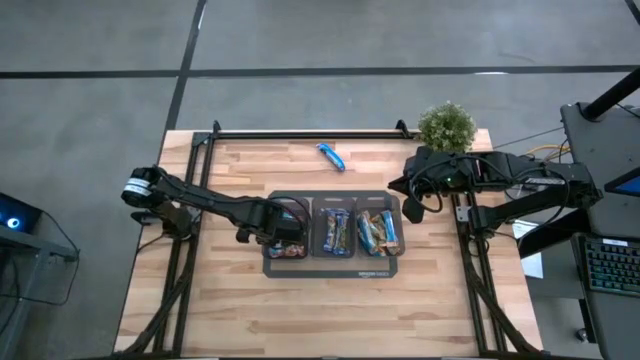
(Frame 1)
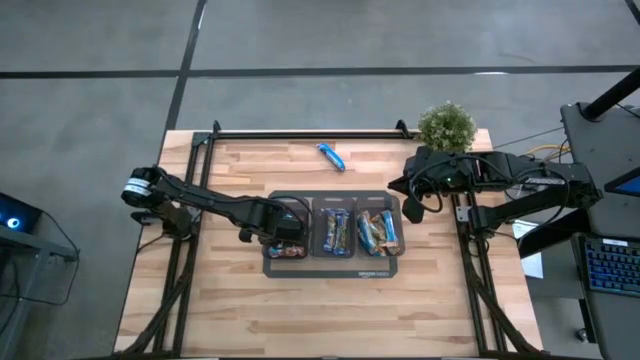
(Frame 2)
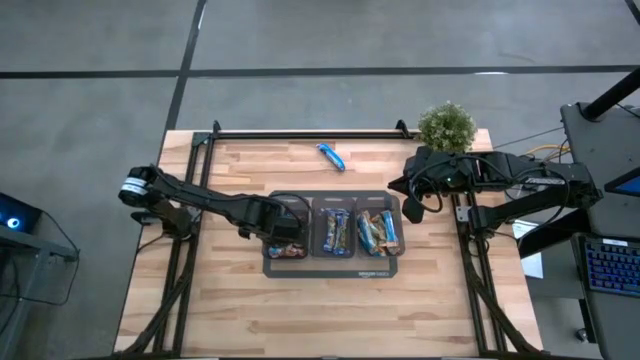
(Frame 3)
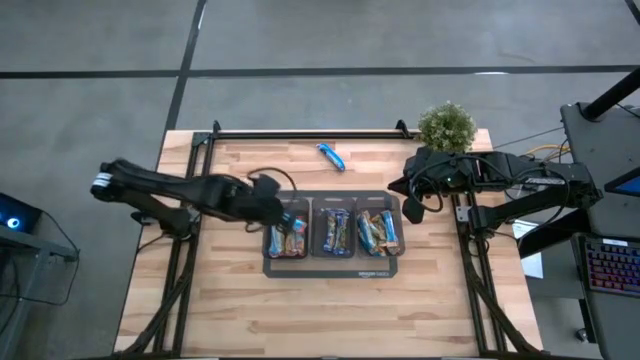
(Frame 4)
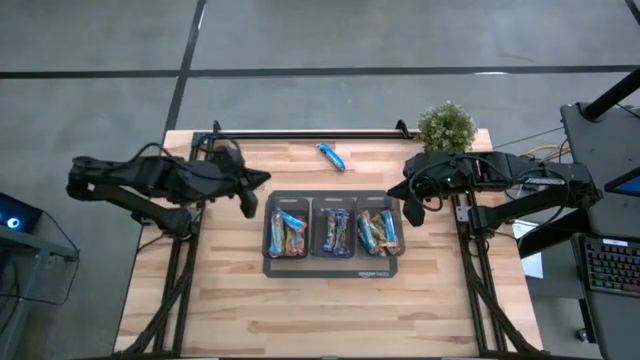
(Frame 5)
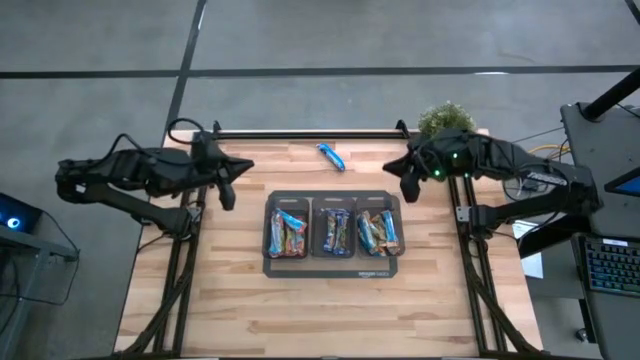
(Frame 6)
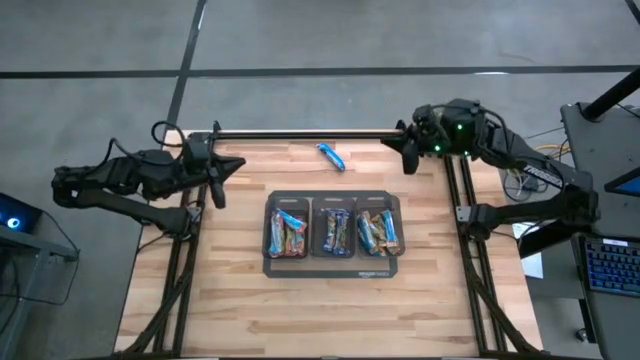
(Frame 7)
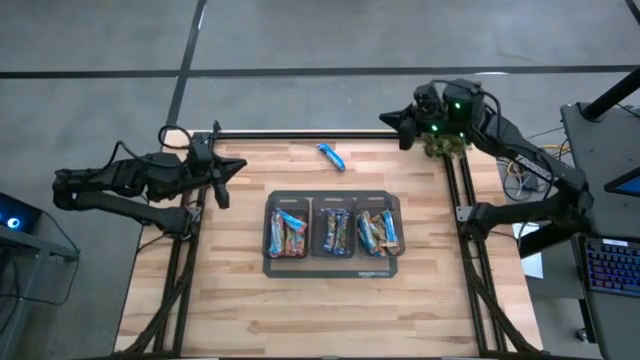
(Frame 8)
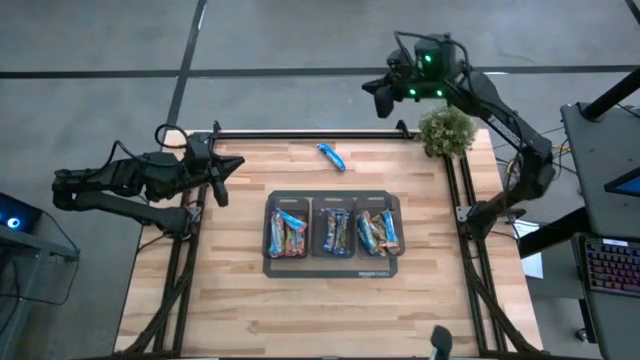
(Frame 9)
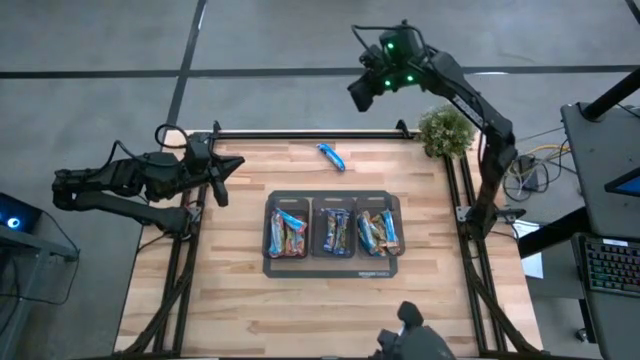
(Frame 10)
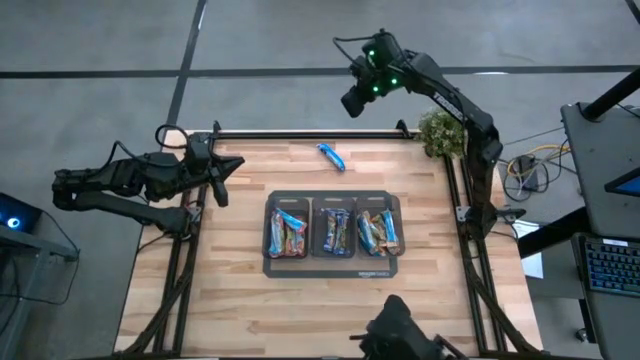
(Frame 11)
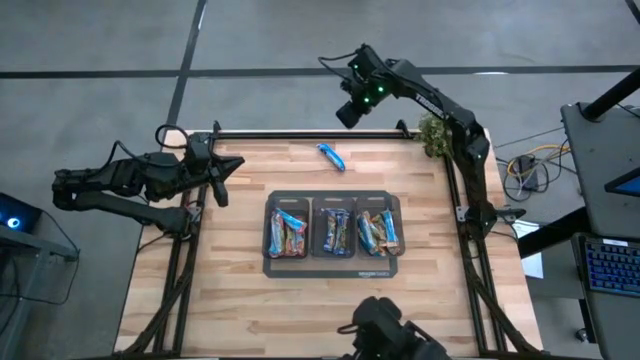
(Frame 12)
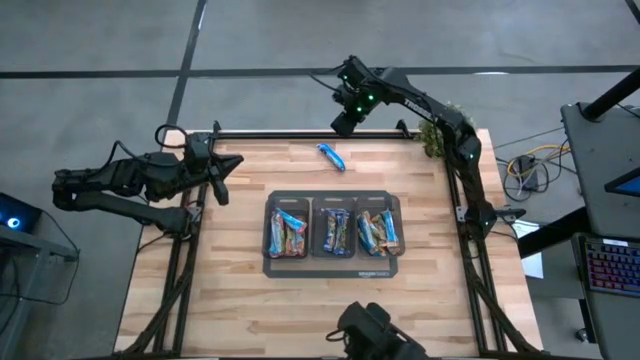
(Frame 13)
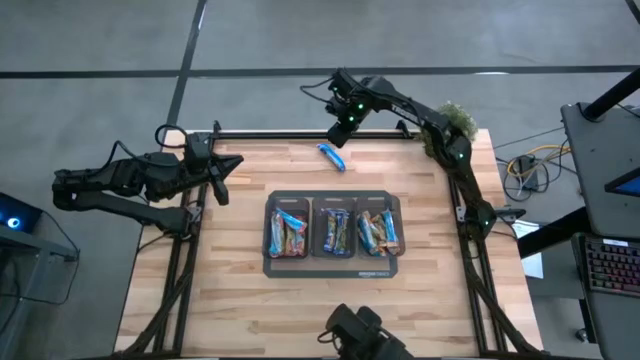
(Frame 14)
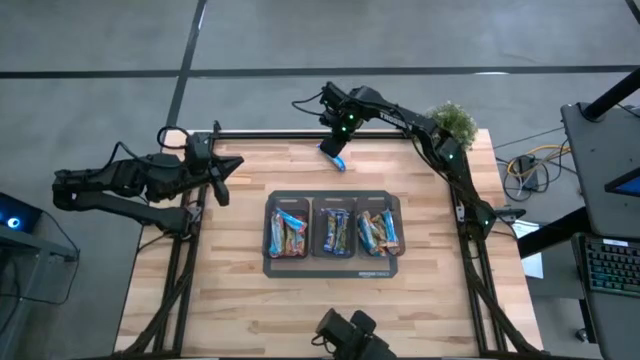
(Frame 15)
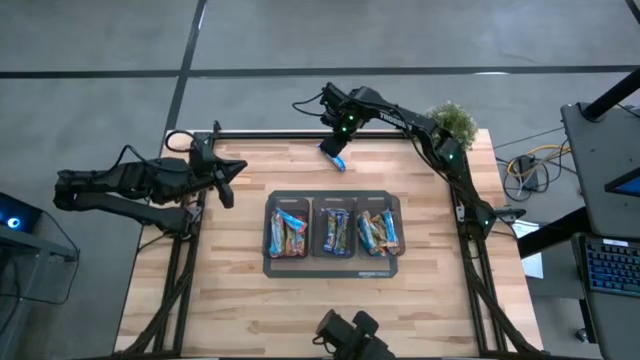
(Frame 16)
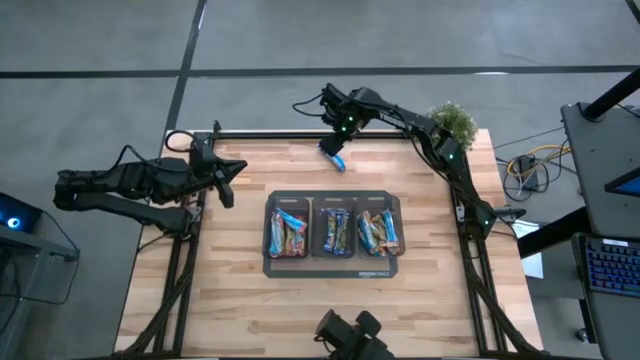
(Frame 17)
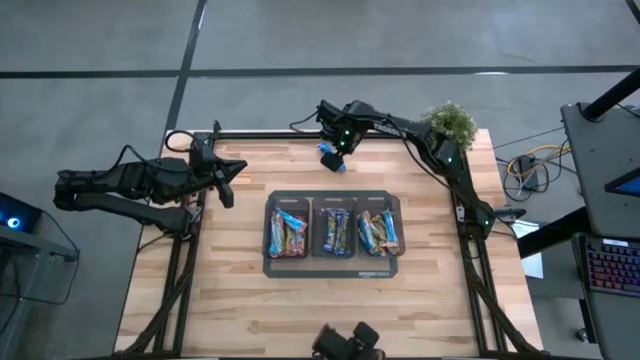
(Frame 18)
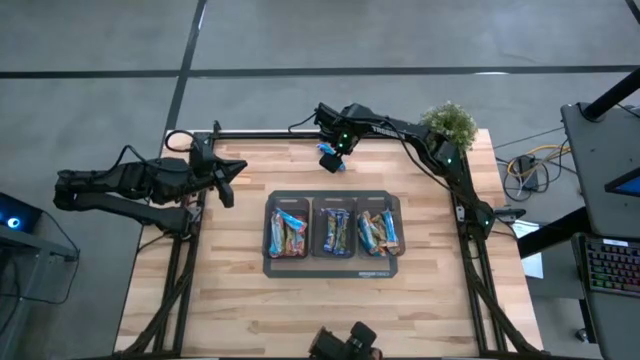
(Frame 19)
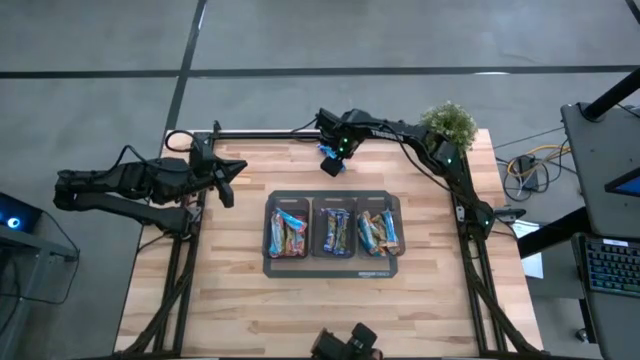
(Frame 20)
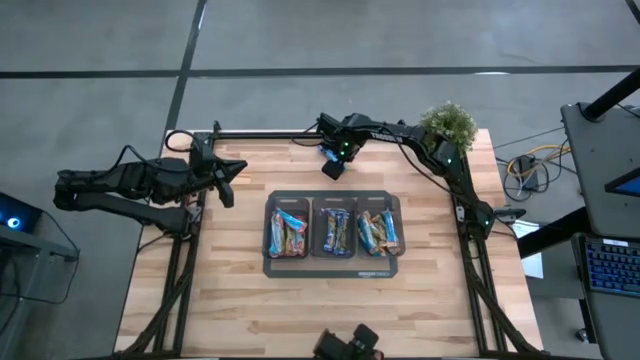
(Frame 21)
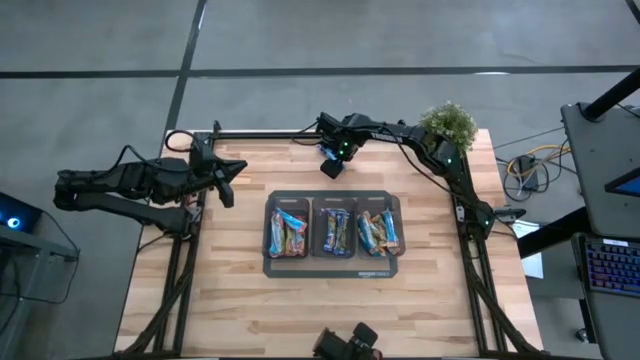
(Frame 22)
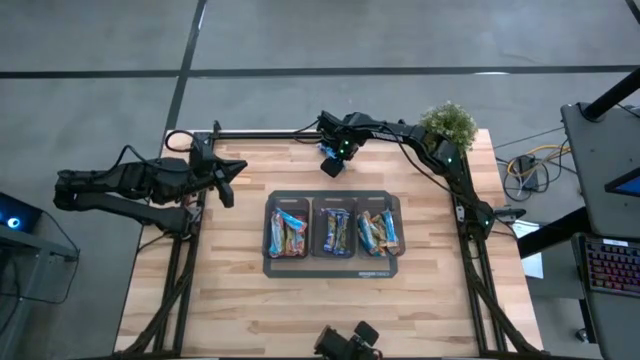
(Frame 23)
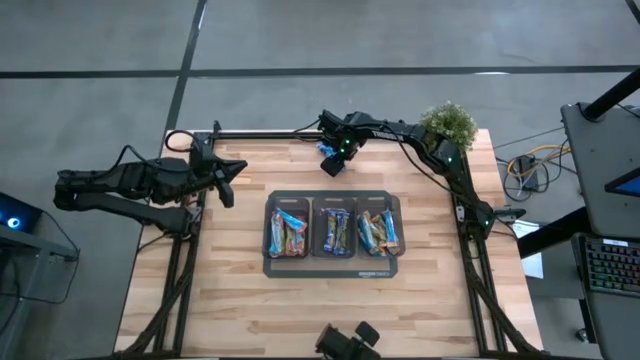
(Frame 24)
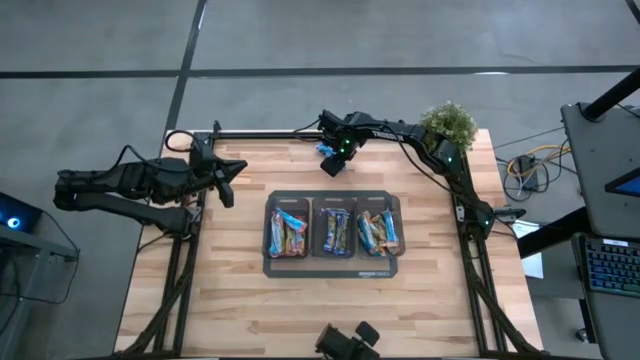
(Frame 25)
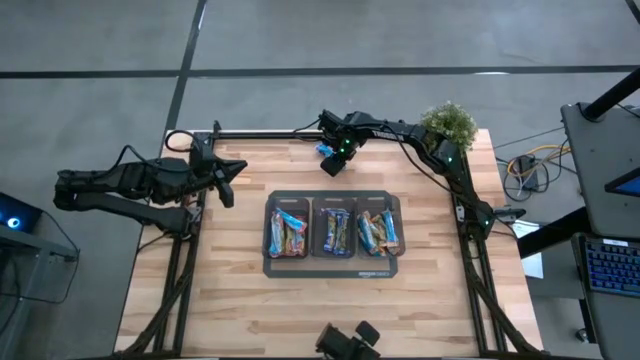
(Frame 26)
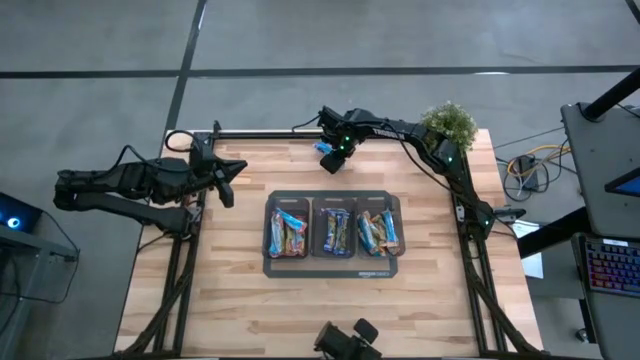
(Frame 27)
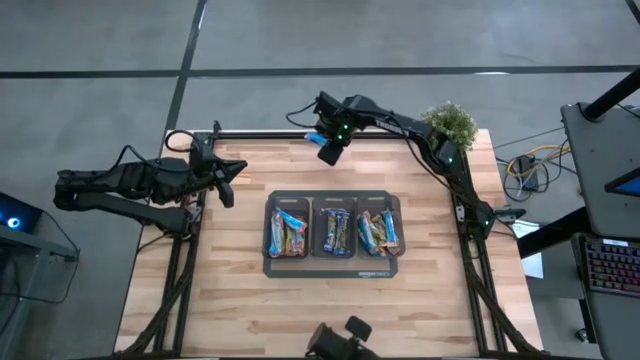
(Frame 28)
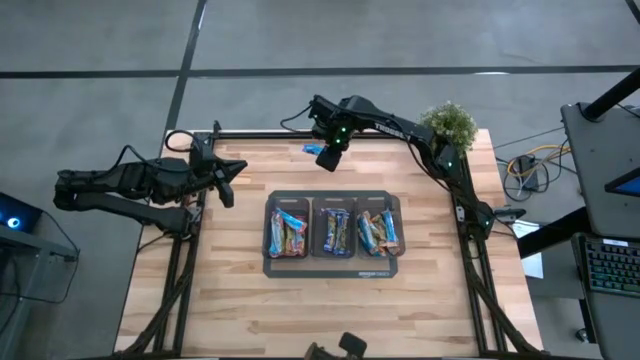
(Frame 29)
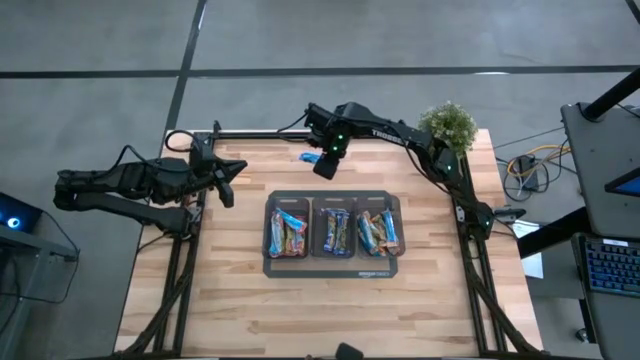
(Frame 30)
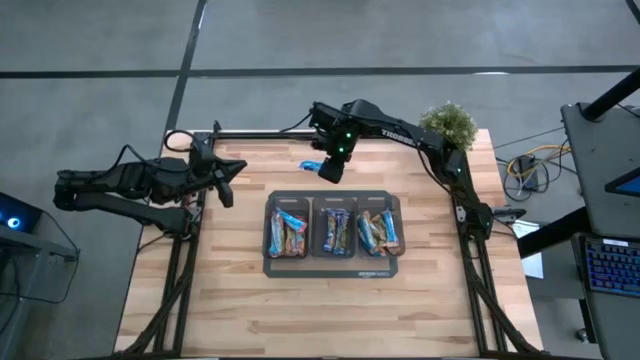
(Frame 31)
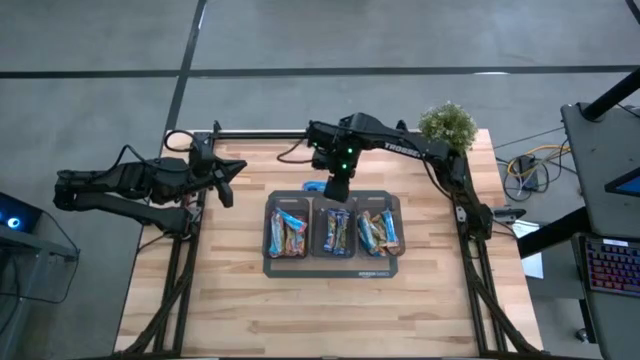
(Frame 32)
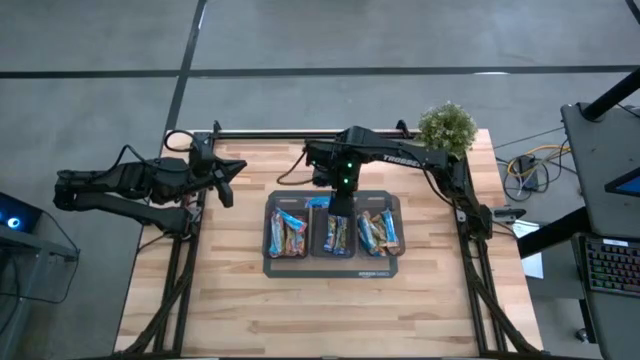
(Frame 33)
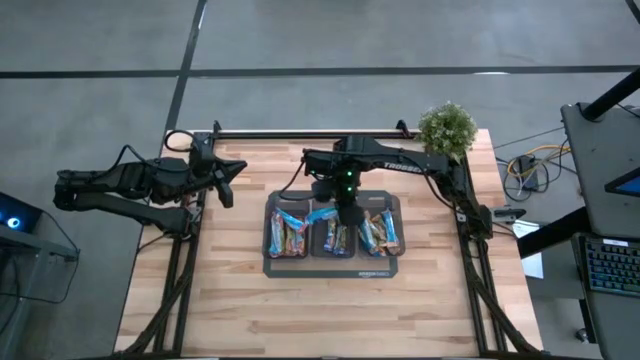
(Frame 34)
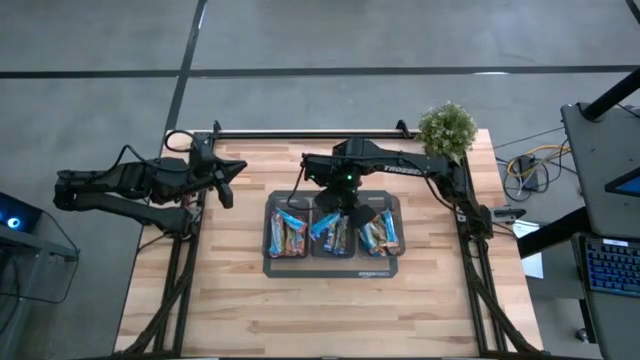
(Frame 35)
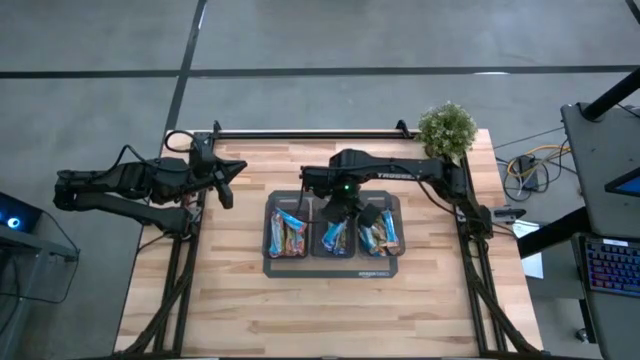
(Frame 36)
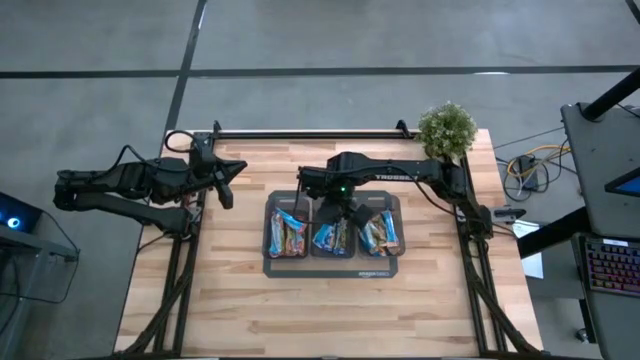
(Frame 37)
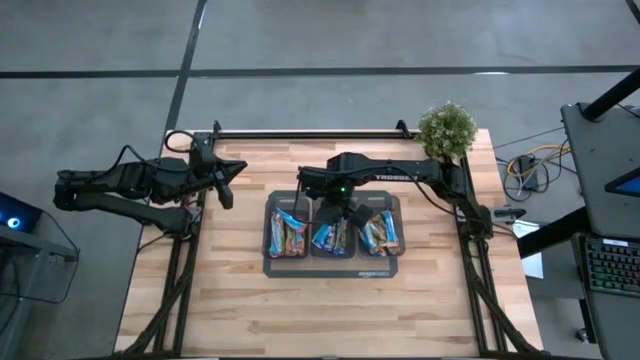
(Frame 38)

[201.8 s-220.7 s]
Task: Pick and place Granola Bars by type
Put the blue granola bar into the middle black bin
